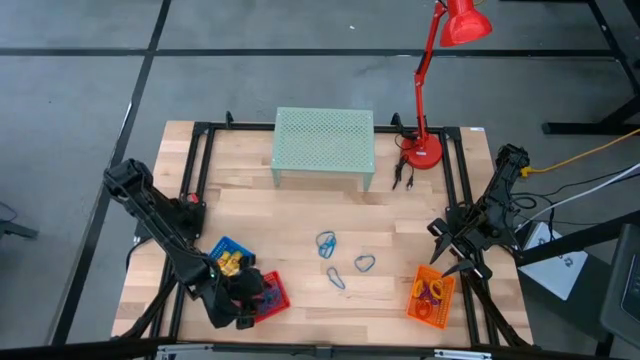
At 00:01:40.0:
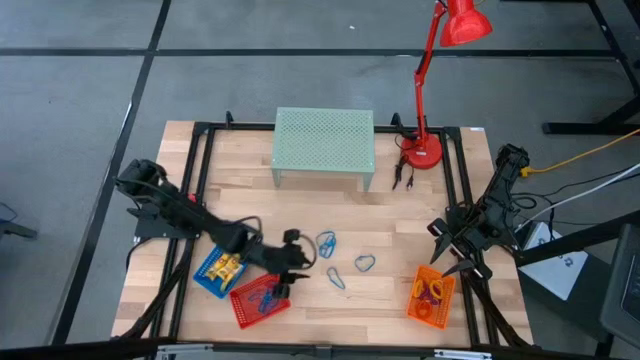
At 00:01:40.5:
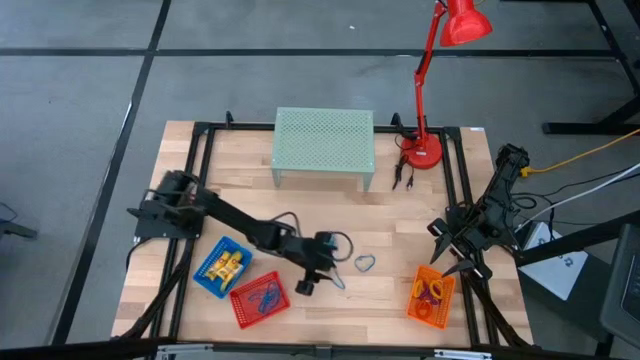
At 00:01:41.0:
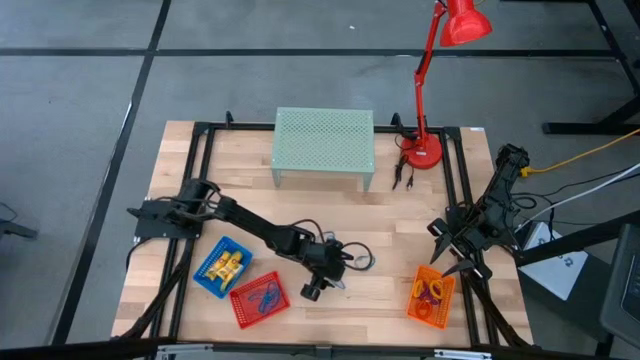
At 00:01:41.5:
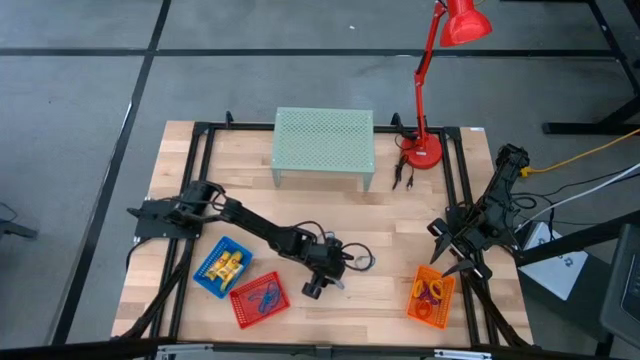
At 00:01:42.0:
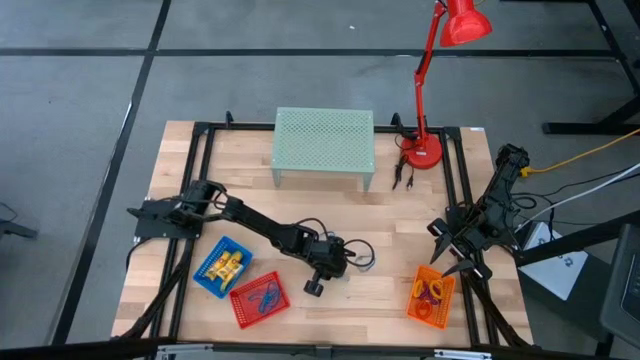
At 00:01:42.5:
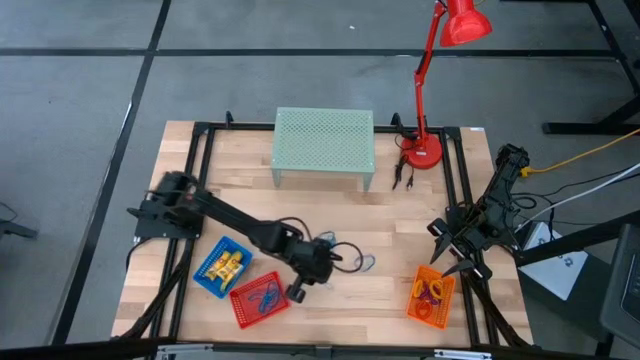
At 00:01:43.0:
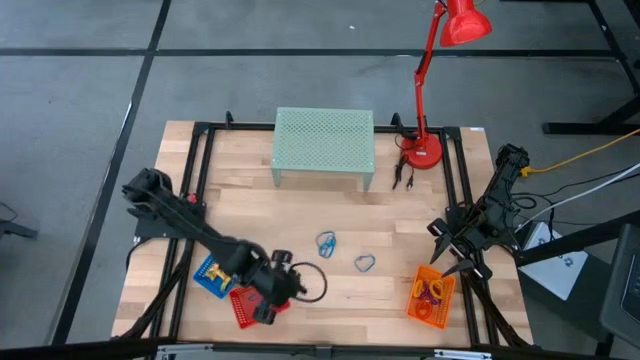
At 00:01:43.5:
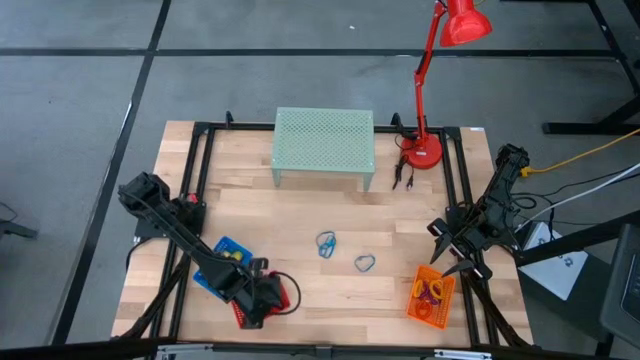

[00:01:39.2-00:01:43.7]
Task: Pick & Place Office Desk Supplies
Put the blue rubber band into the red bin

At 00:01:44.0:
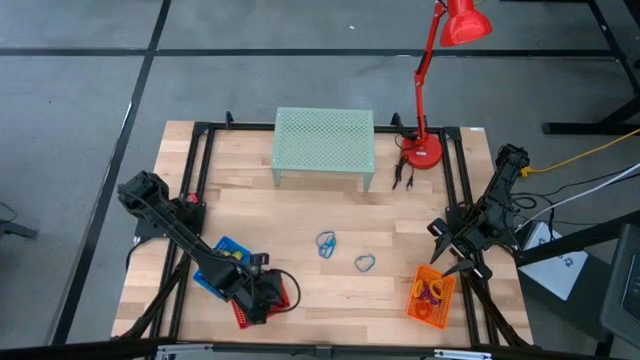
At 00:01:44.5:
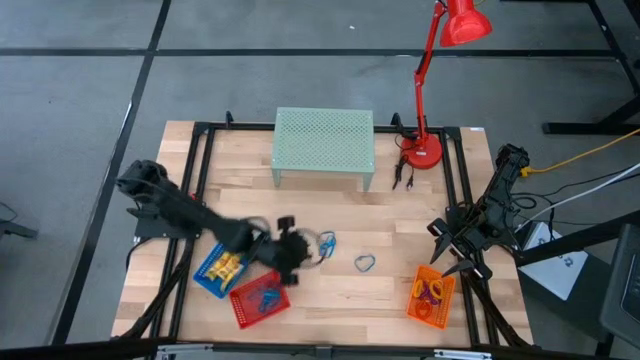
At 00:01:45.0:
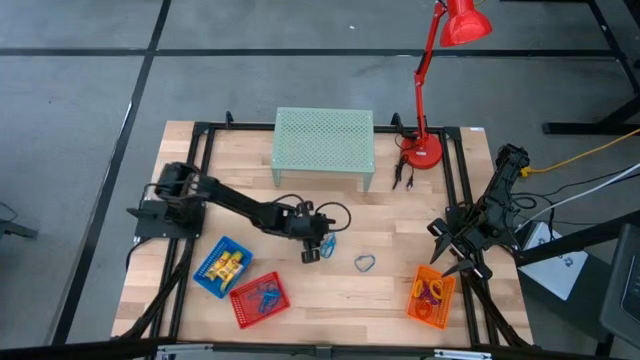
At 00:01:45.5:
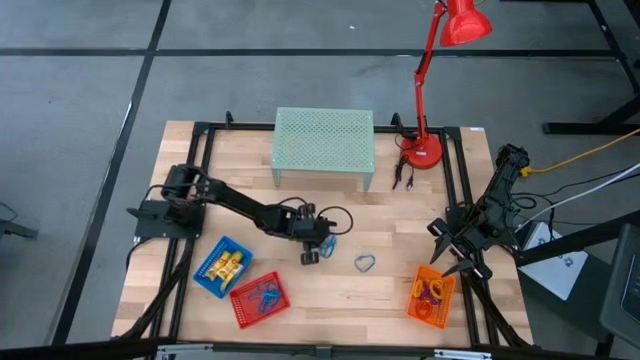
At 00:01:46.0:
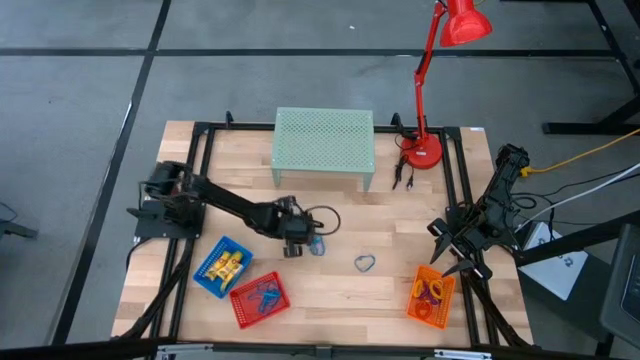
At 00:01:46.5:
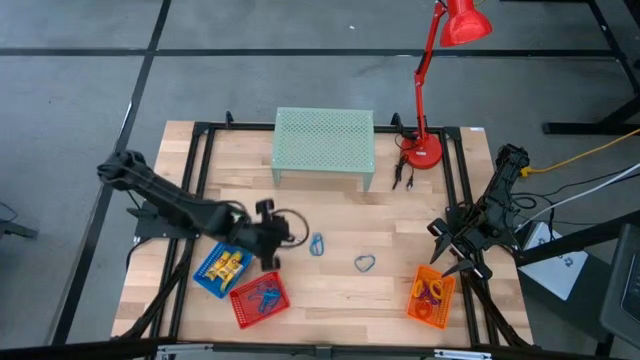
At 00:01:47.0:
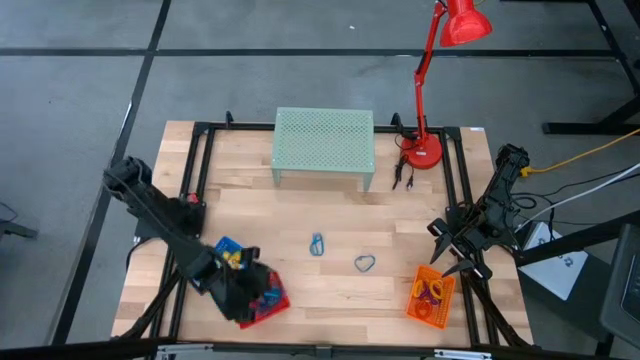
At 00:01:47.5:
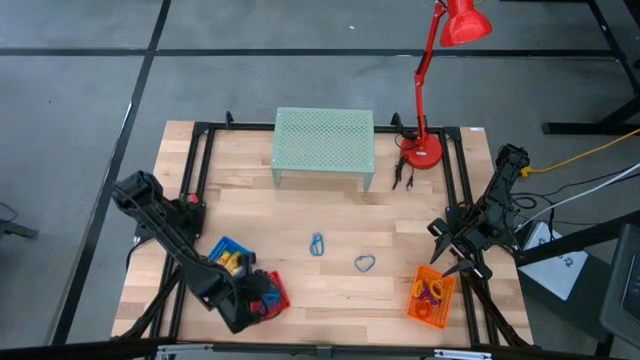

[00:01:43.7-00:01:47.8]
Put the blue rubber band into the red bin

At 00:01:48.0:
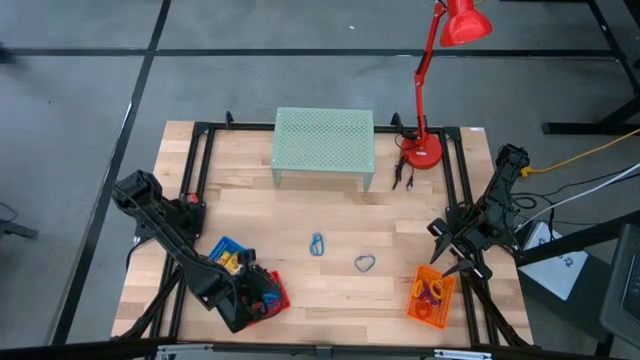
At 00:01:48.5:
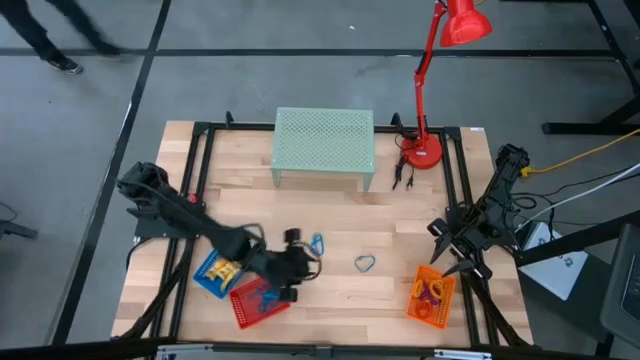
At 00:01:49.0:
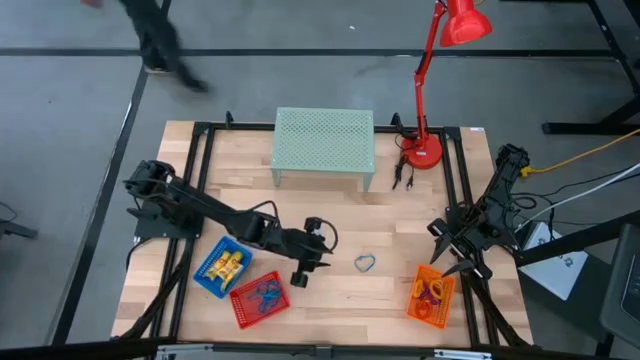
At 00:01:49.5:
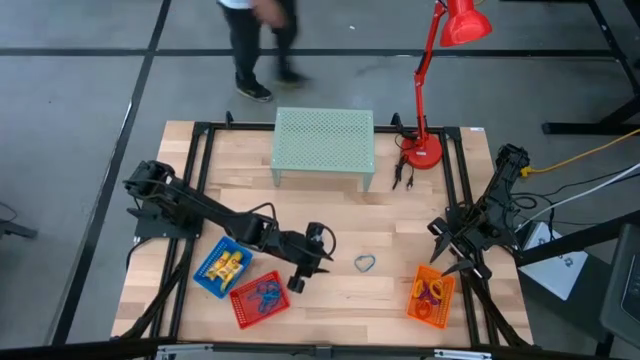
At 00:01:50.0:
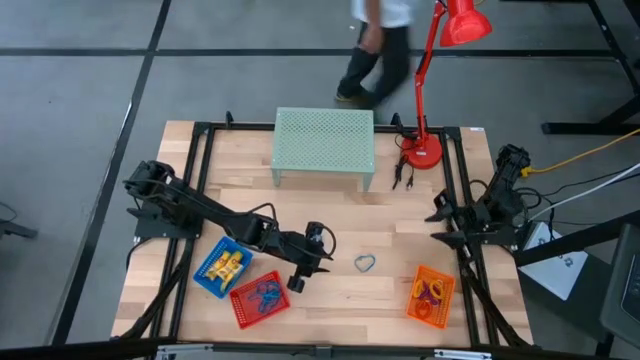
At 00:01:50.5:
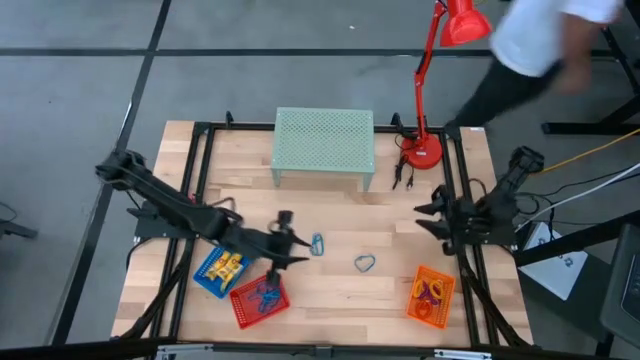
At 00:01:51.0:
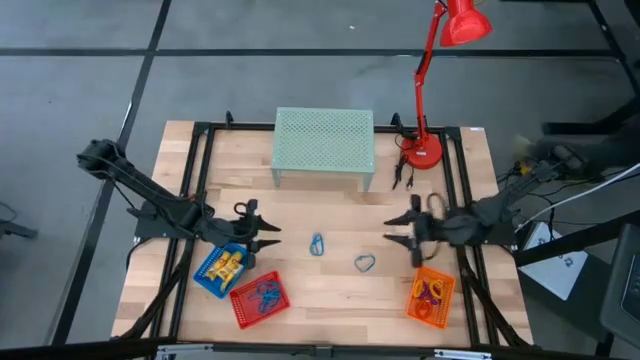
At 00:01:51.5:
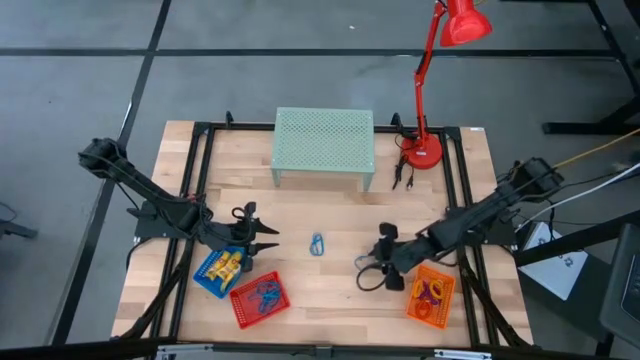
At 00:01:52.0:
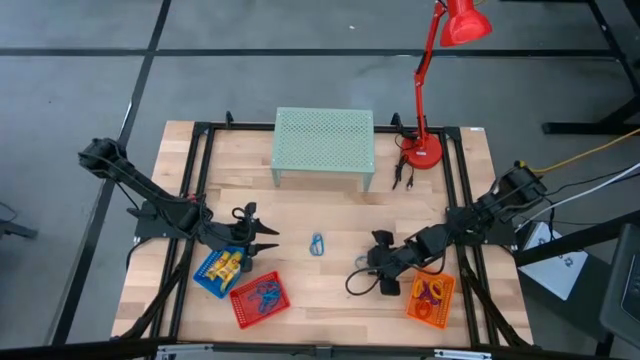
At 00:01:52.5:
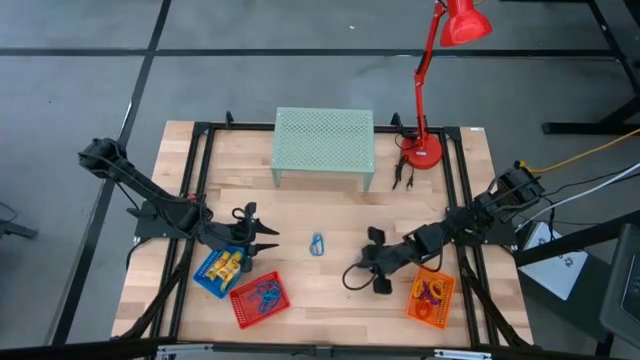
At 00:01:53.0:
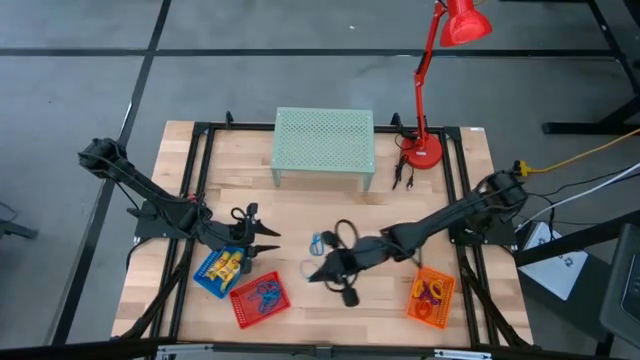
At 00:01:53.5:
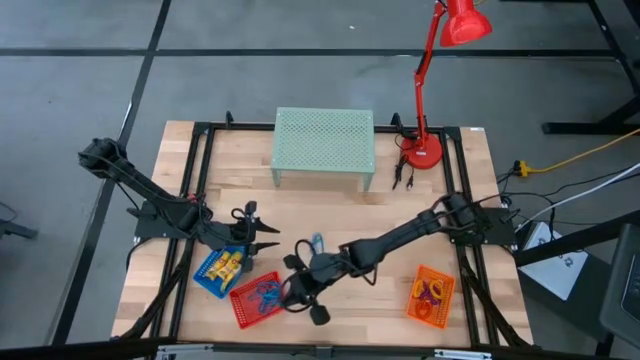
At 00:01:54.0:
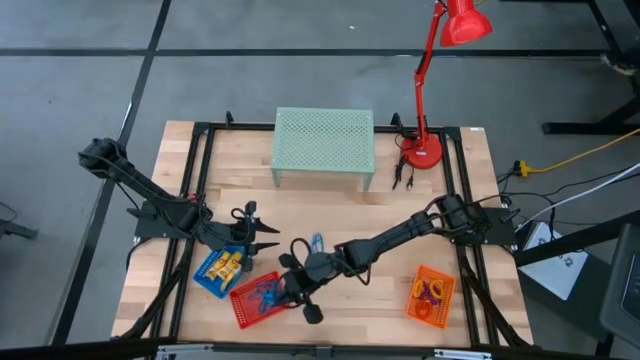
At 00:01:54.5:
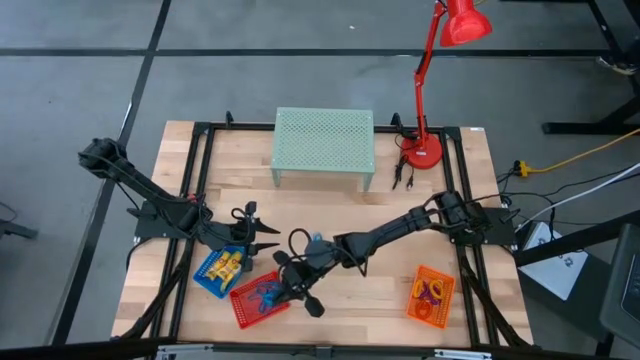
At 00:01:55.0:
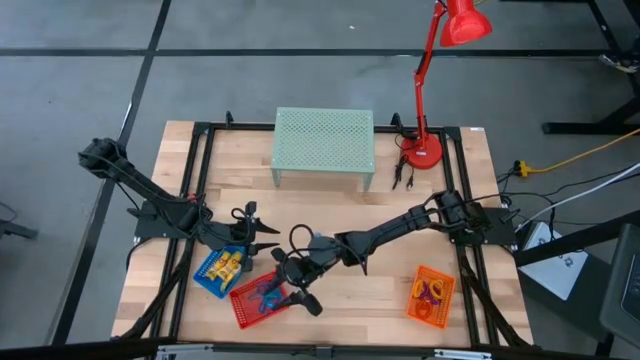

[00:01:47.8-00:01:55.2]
Put the blue rubber band into the red bin

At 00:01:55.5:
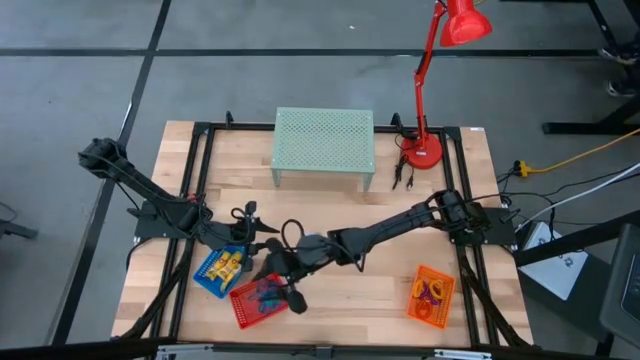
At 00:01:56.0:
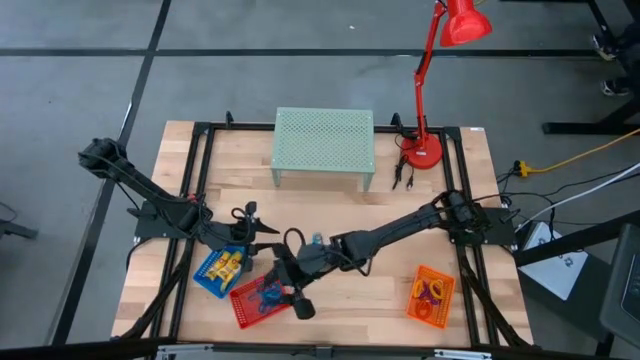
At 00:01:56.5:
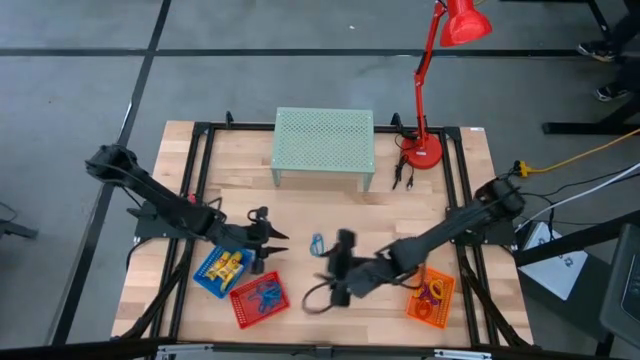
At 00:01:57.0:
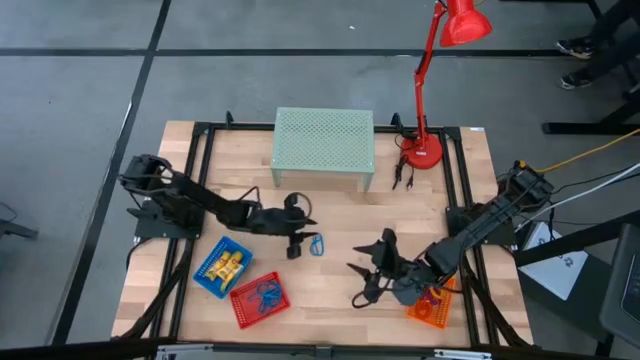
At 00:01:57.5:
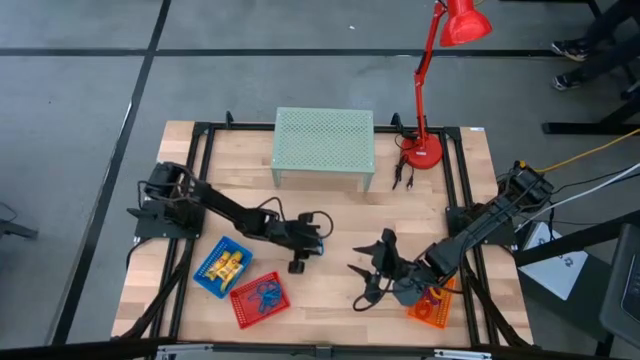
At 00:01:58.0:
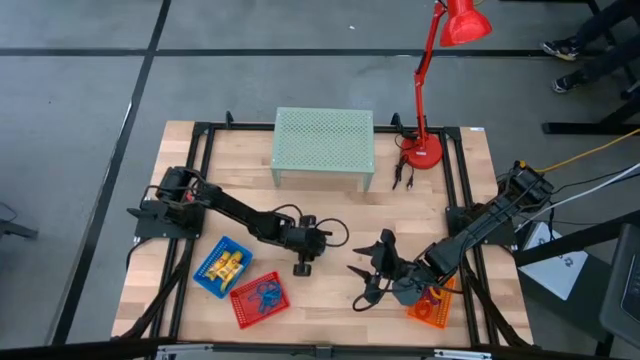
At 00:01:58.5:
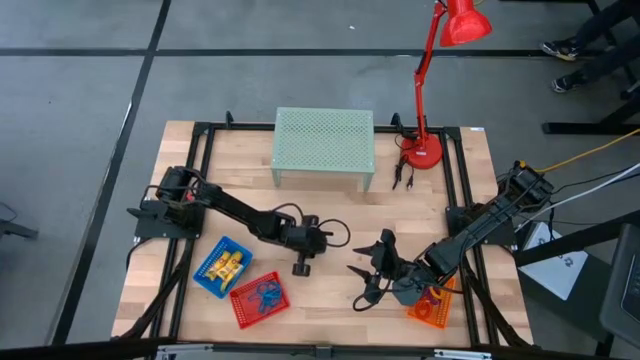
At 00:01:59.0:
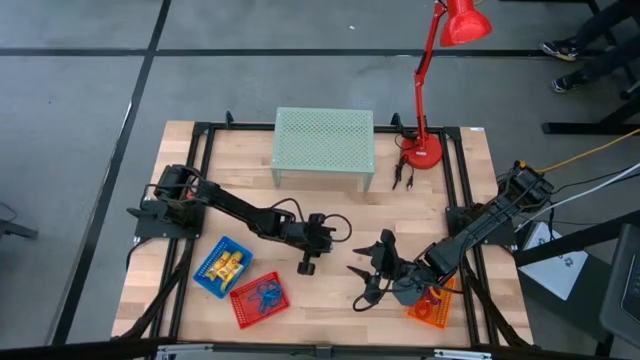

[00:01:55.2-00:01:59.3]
Put the blue rubber band into the red bin
